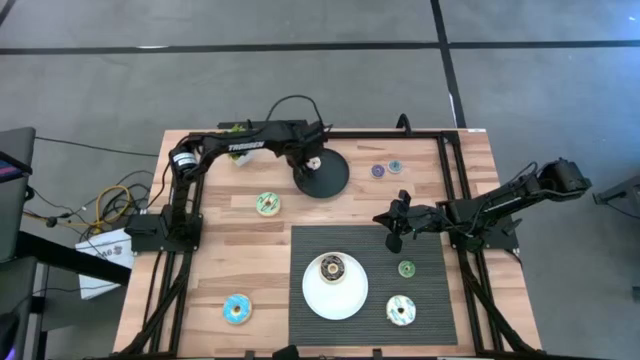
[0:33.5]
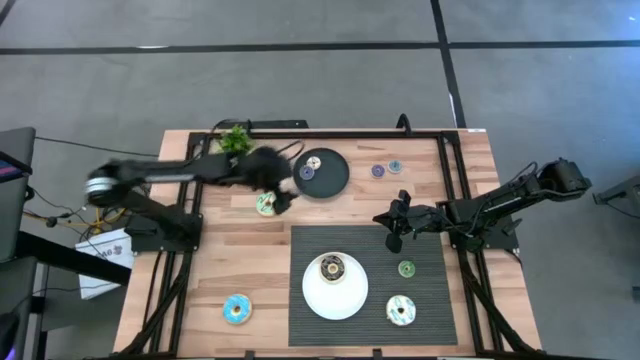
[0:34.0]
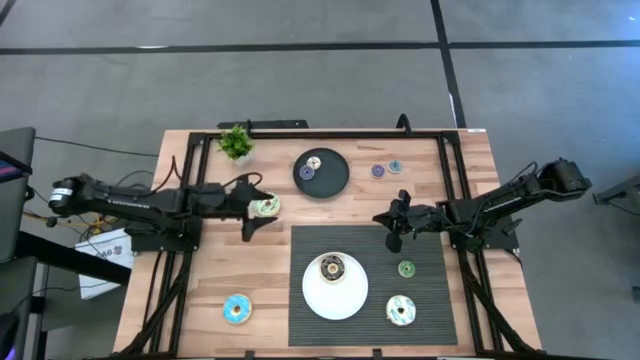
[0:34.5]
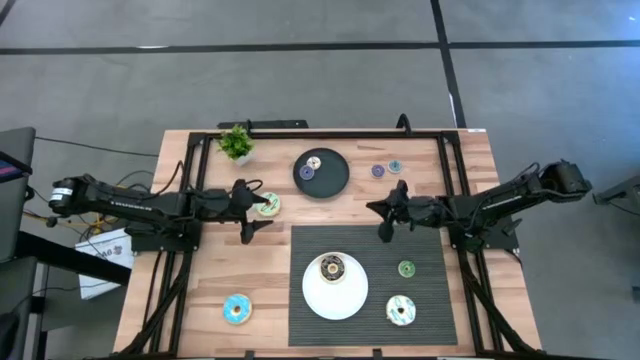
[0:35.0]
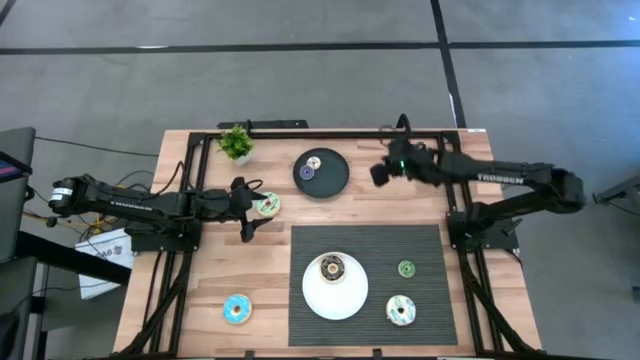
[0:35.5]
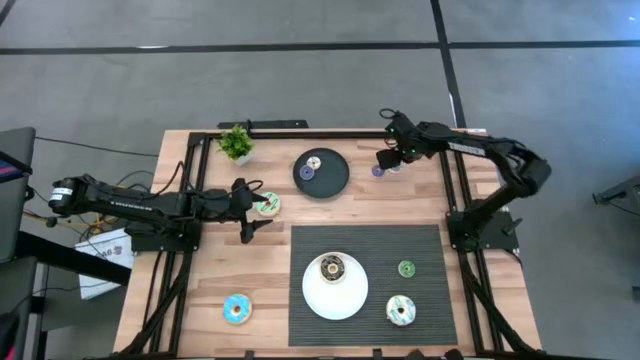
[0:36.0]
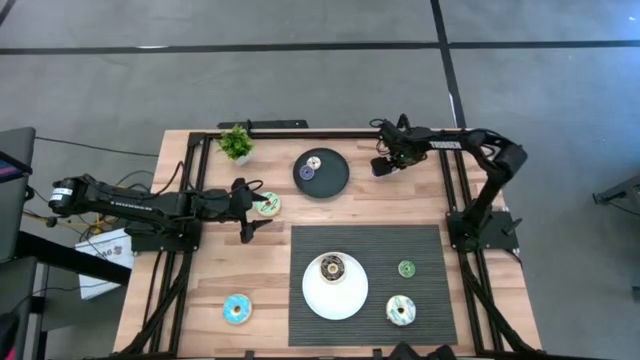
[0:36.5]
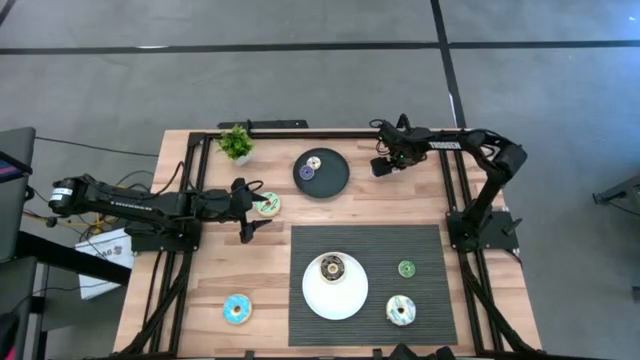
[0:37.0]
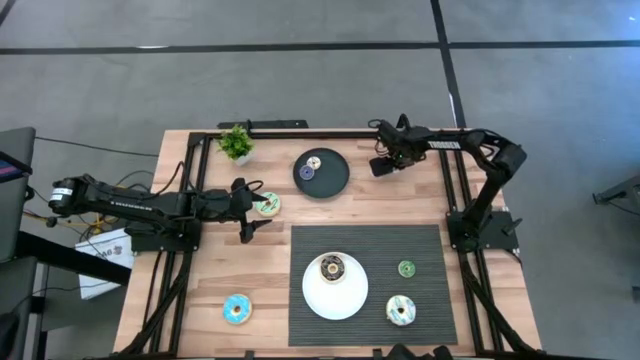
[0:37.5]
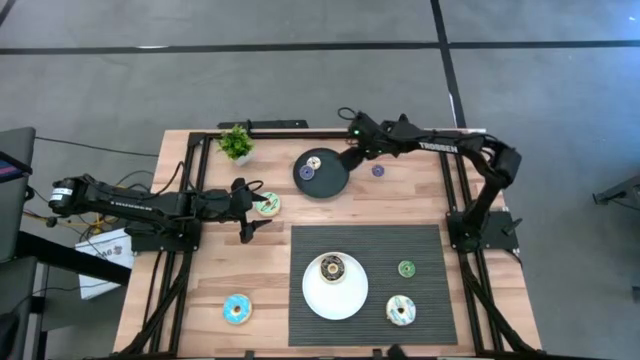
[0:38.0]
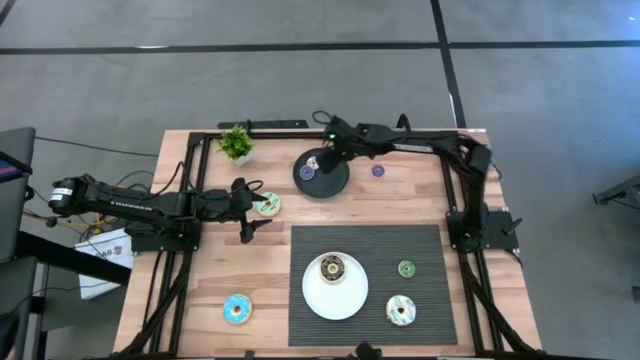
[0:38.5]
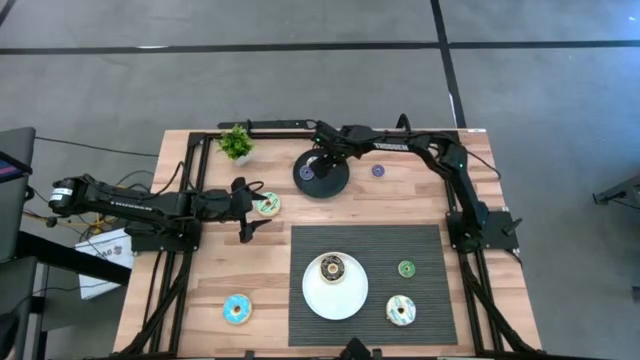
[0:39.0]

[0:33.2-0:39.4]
Task: Pick & Place donuts
Put the small blue donut on the black plate

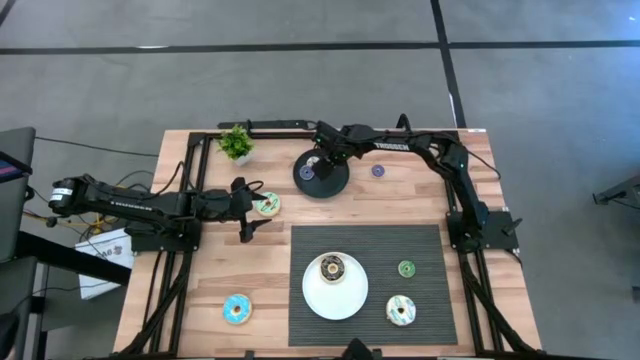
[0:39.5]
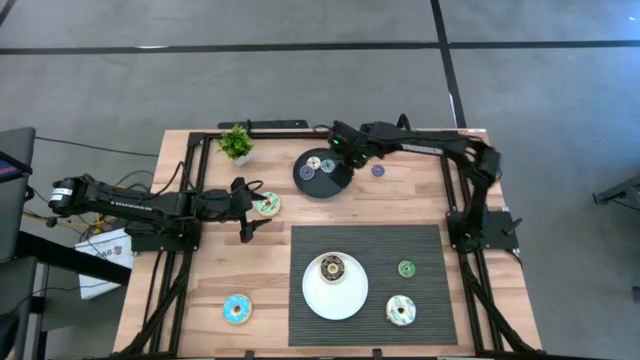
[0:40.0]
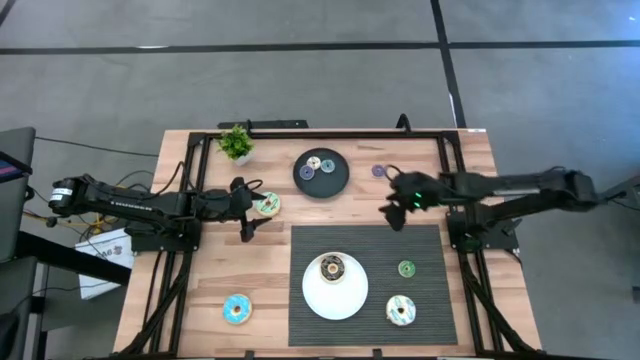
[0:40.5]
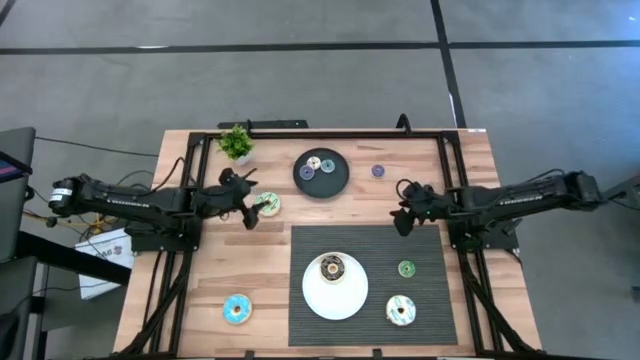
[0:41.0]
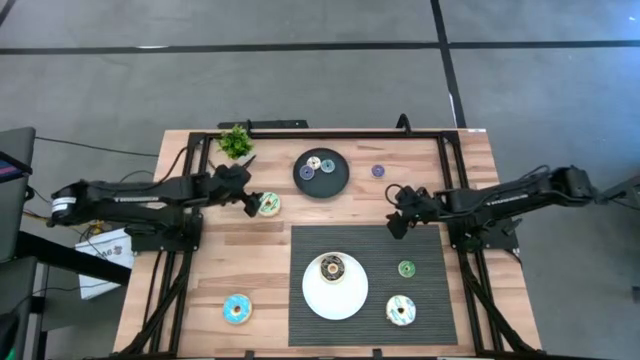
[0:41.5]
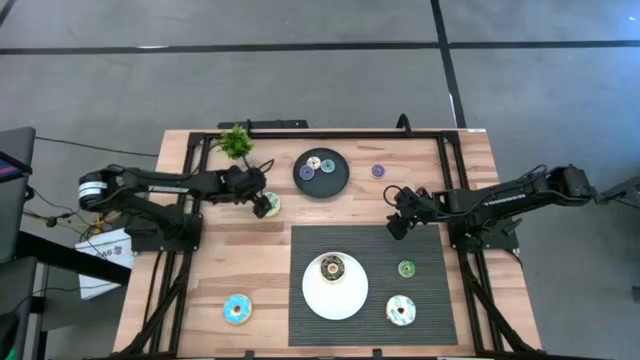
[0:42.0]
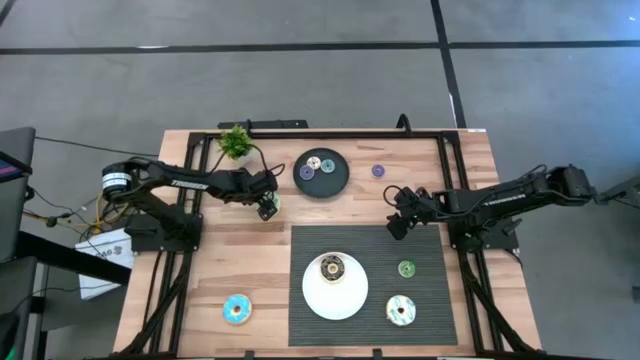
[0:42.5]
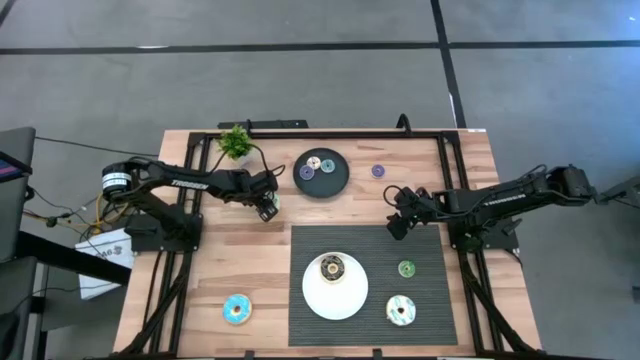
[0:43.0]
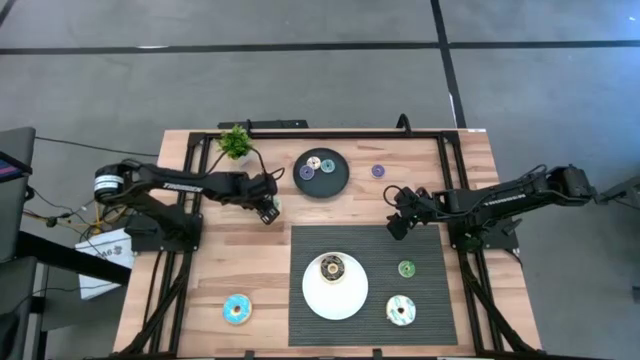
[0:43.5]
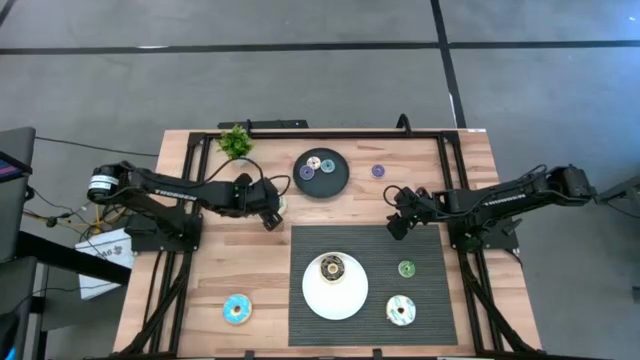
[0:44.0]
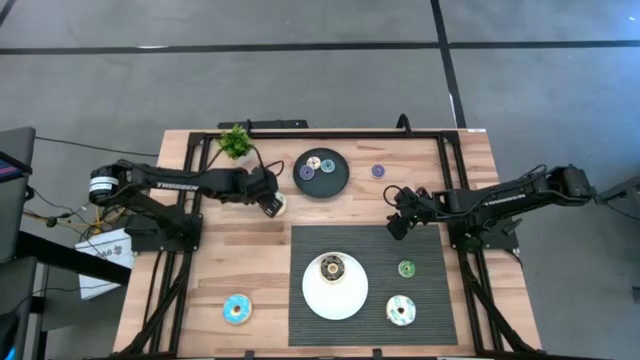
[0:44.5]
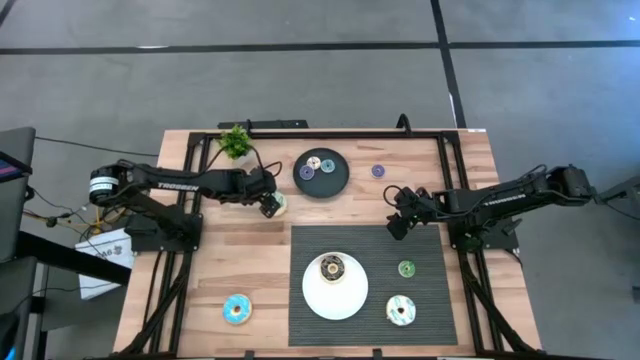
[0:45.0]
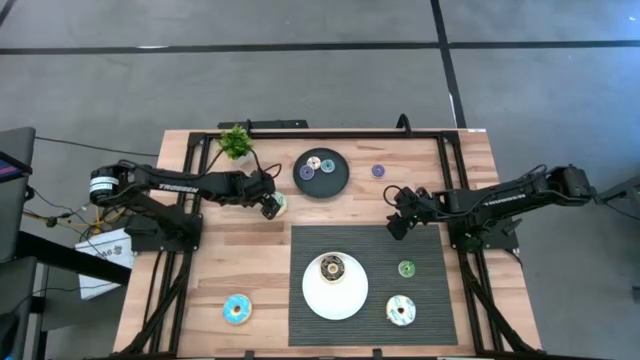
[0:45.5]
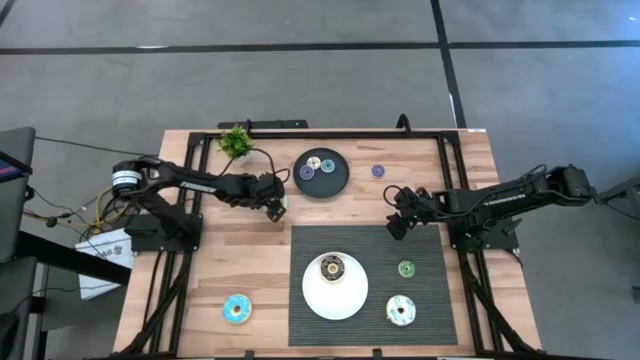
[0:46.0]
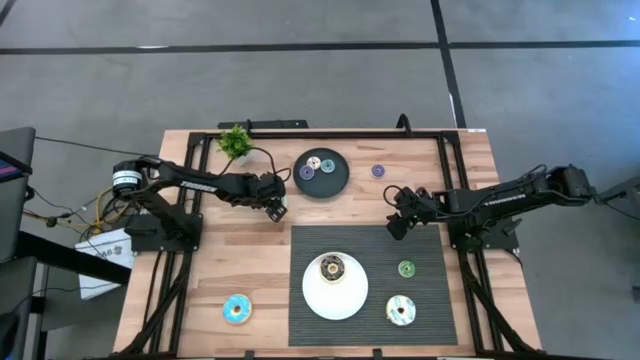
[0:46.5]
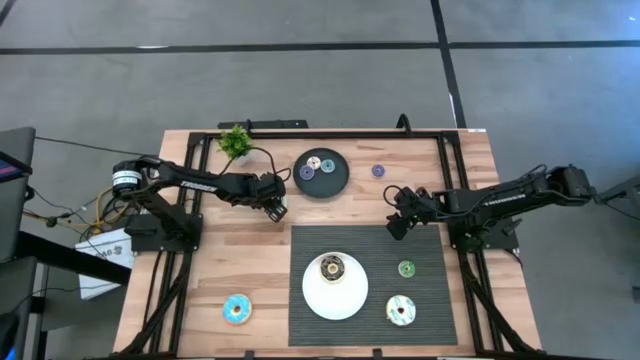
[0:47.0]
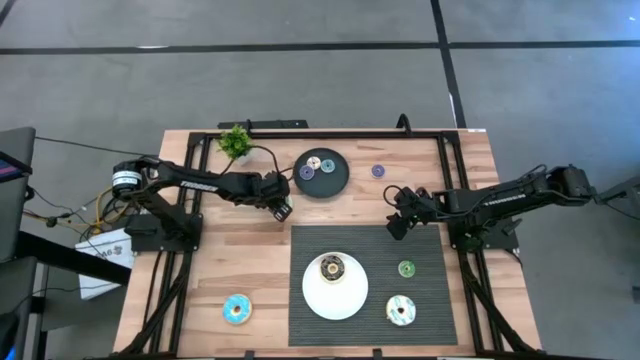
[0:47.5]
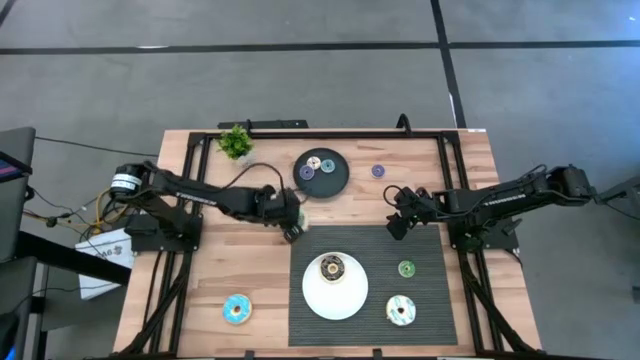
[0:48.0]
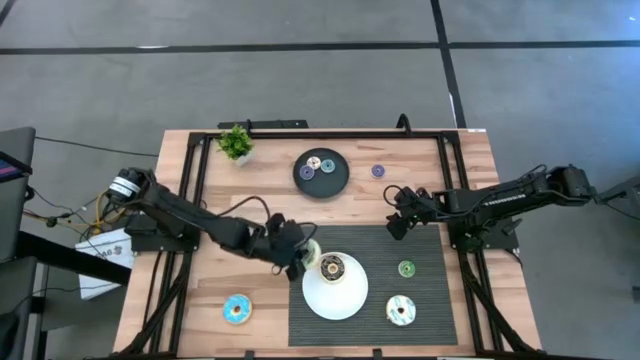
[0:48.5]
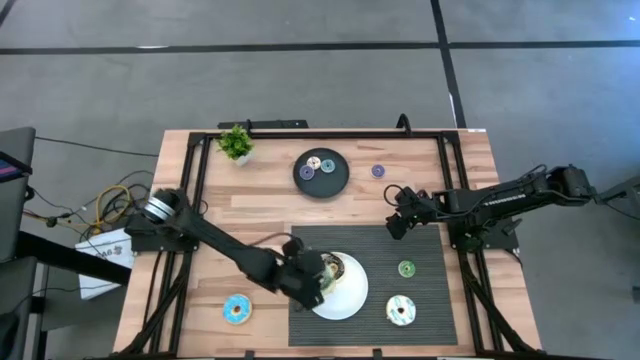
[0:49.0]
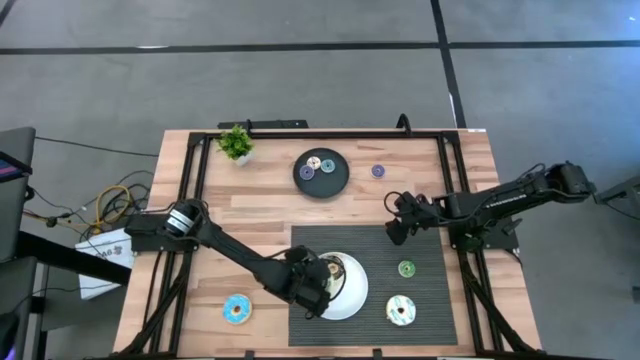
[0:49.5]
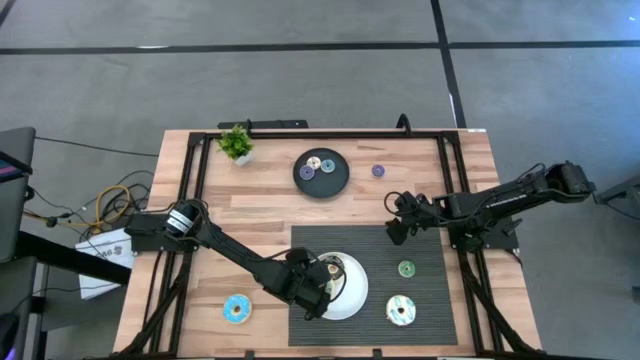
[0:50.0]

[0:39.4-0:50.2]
Put the large blue donut on the white plate

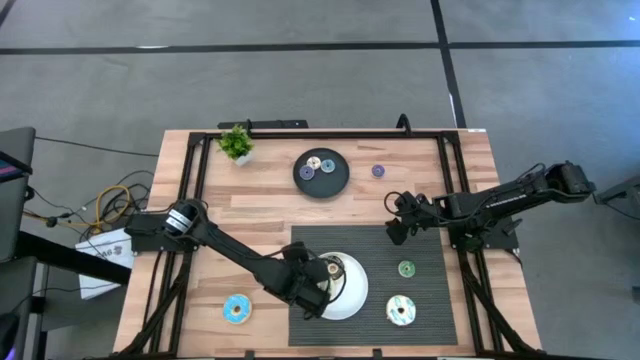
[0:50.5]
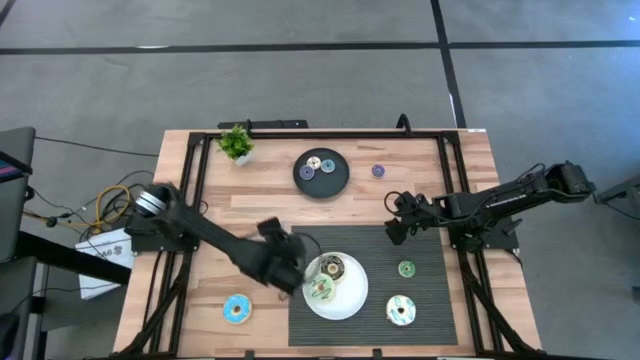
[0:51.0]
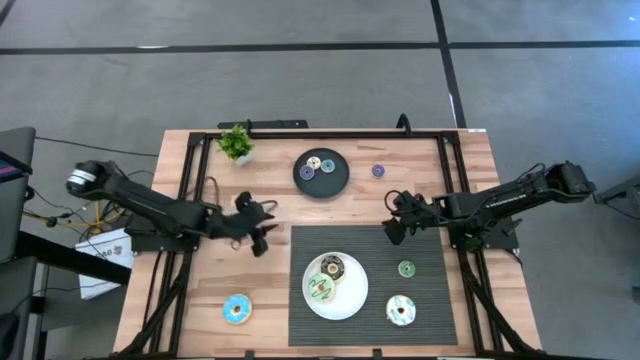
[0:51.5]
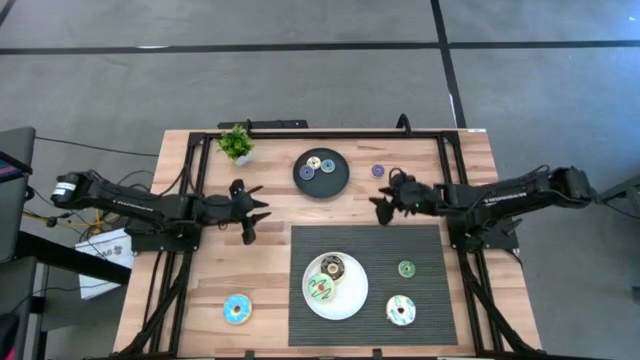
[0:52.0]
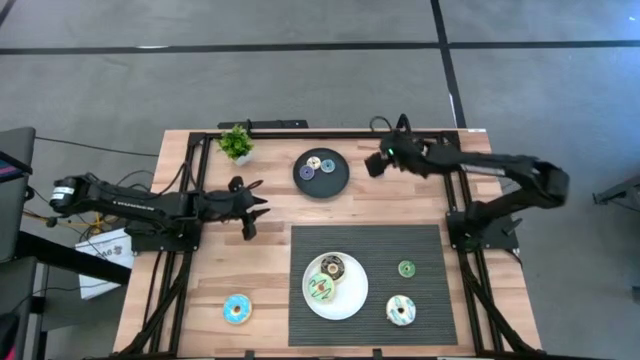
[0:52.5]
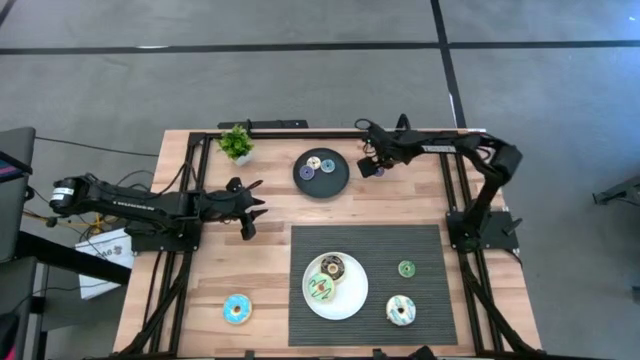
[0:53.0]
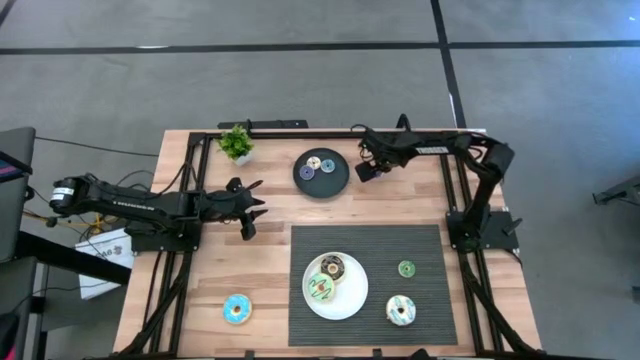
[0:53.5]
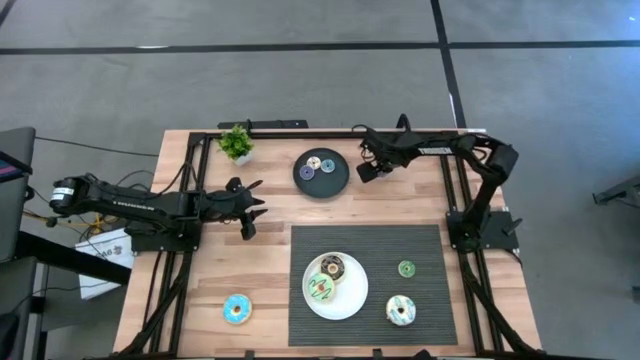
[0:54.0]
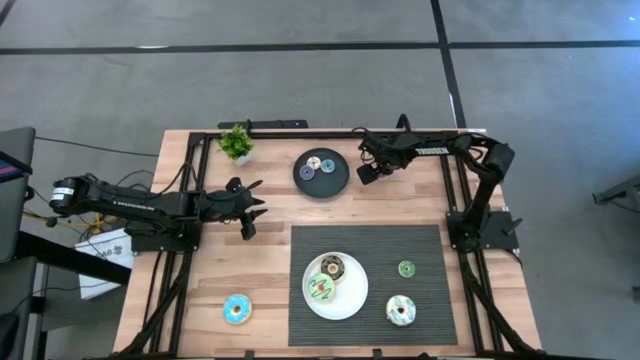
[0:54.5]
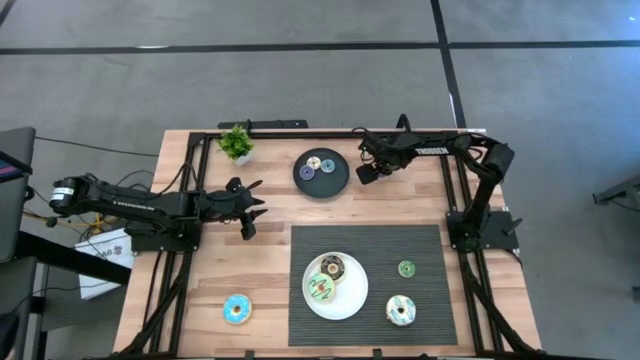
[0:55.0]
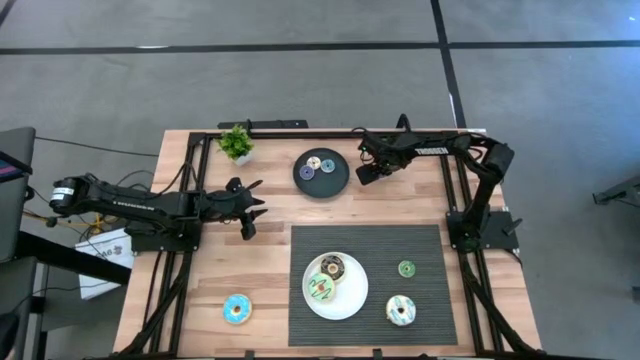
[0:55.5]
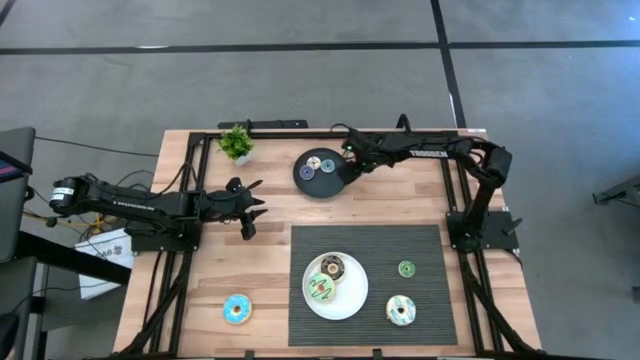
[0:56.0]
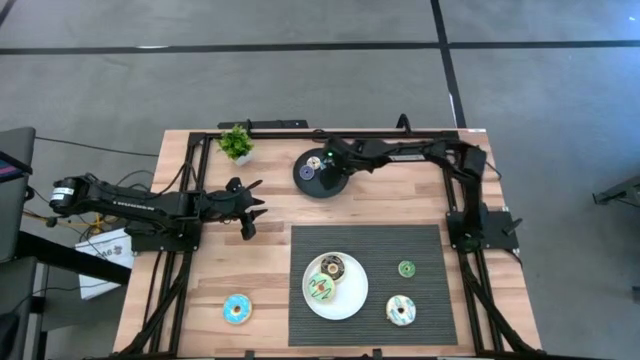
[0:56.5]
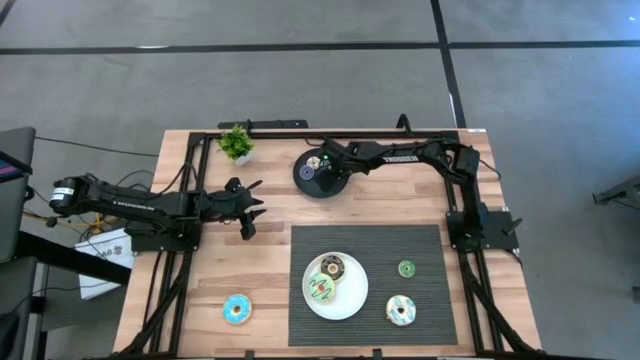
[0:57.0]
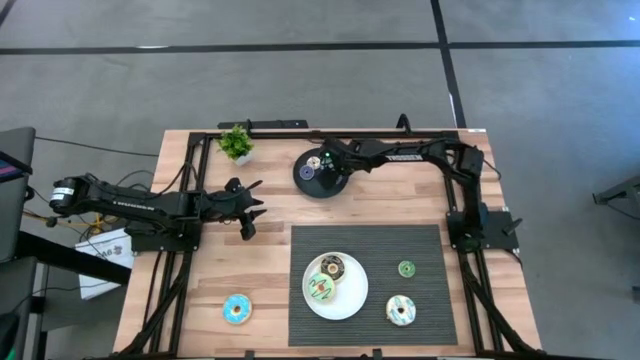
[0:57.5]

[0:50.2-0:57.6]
Put the small blue donut on the black plate
